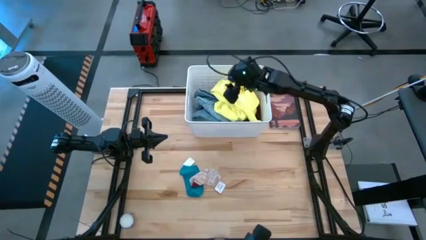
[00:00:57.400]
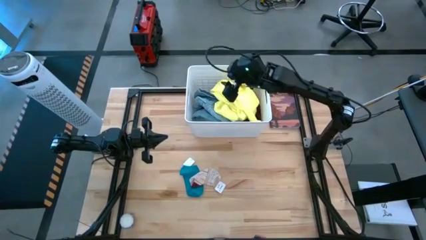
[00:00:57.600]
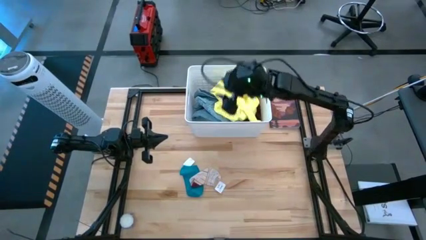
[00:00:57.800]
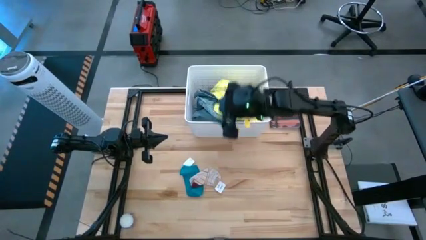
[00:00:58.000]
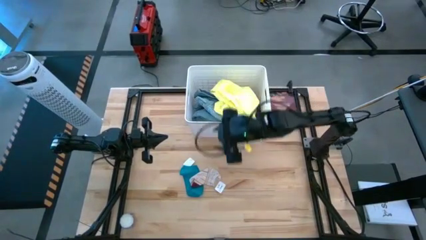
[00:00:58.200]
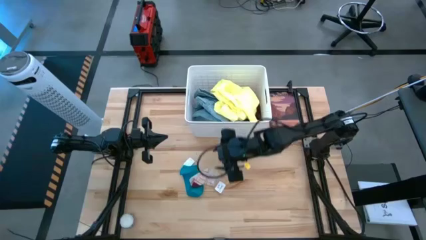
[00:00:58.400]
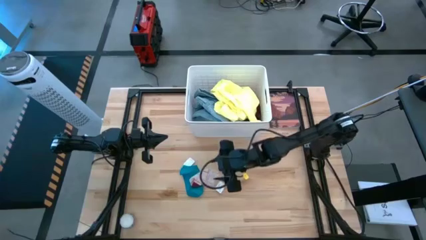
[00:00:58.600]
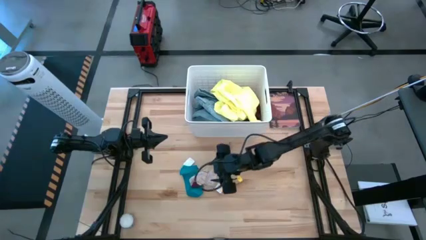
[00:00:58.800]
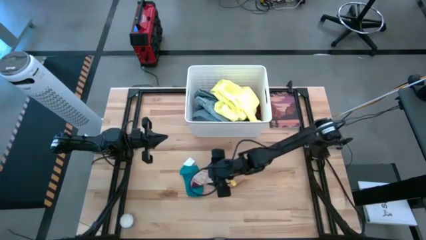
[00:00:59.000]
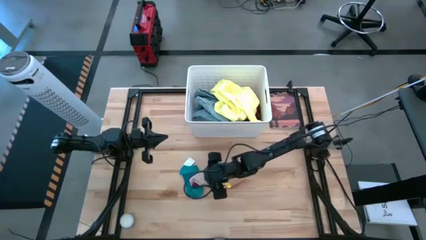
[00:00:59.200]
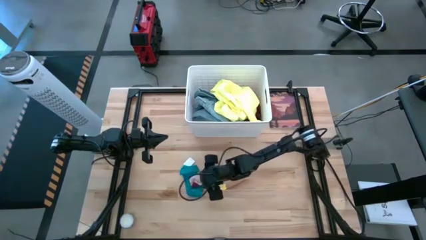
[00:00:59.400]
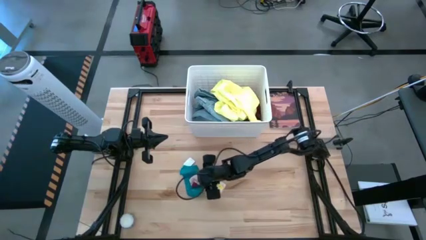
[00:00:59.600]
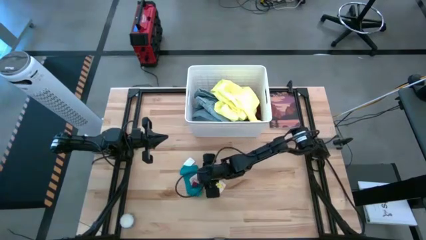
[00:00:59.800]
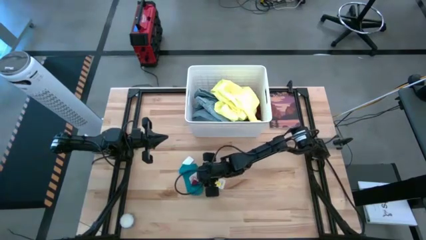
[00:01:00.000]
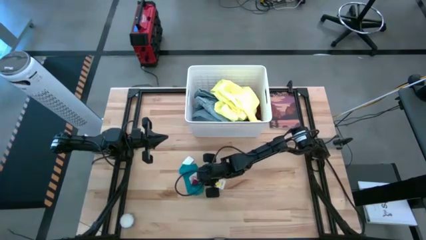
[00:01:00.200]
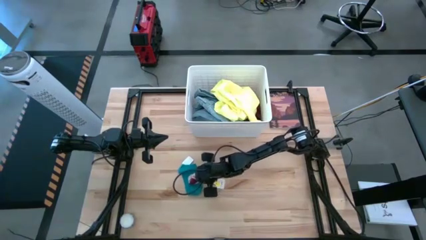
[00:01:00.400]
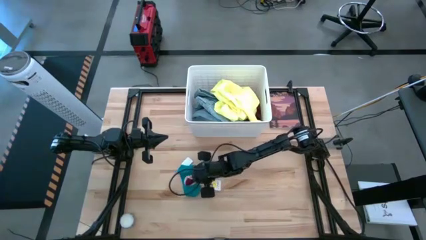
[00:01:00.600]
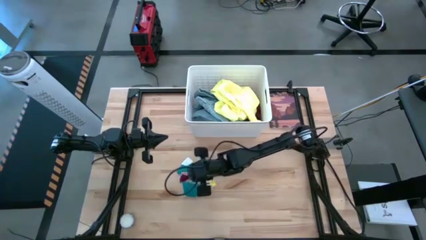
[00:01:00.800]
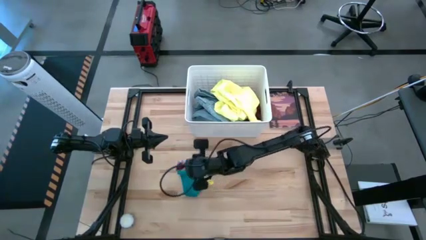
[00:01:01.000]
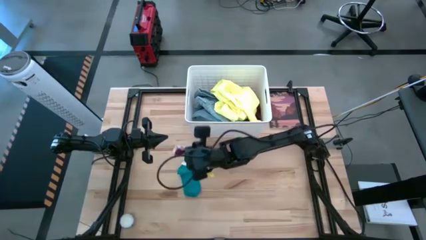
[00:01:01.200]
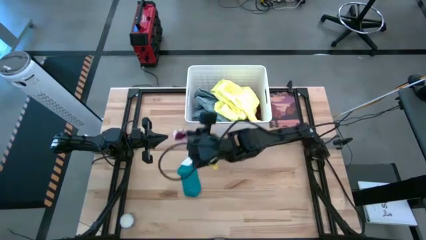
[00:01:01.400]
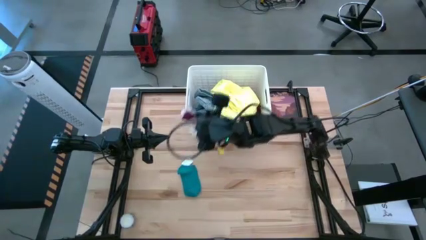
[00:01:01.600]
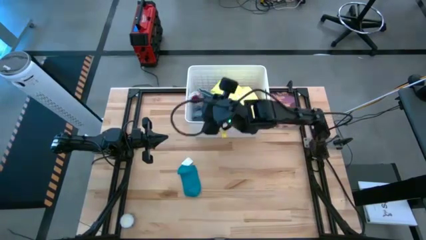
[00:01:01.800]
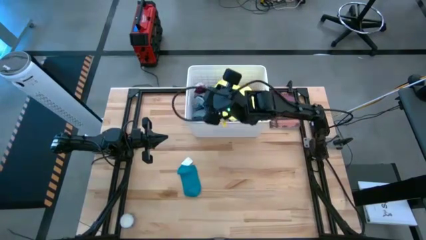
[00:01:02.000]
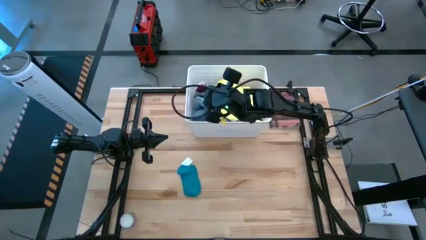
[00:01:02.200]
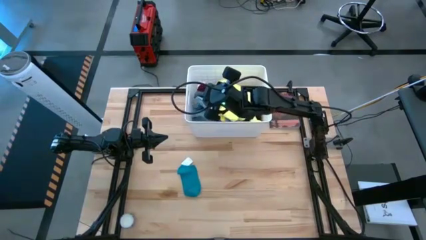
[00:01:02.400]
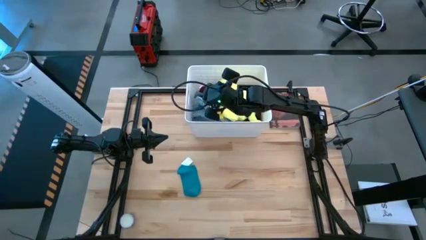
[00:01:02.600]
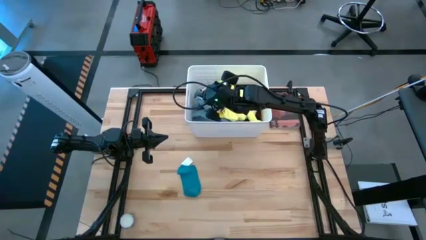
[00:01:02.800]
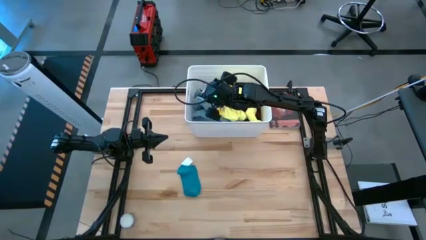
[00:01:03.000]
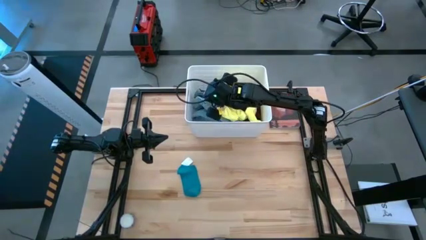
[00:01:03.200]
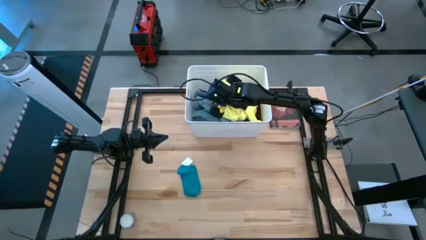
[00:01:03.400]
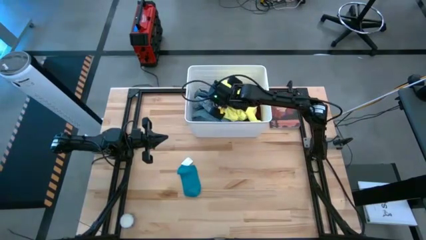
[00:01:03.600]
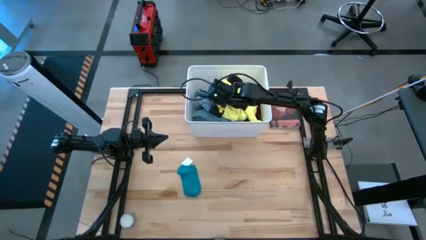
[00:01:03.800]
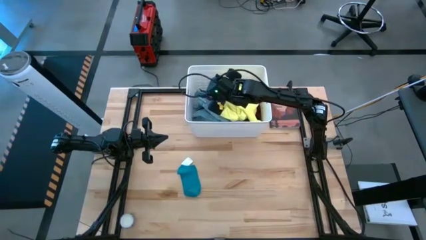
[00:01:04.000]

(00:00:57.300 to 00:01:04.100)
Task: Sort clothes
Put the gray sock into the white laundry bin

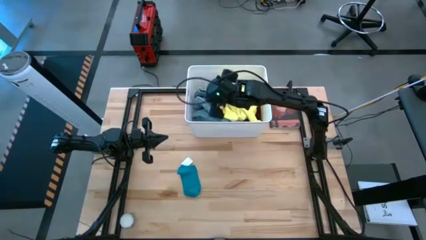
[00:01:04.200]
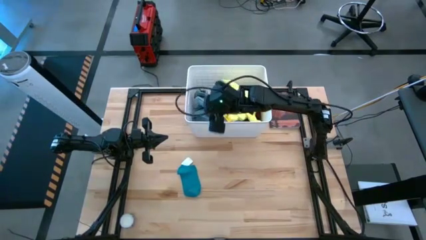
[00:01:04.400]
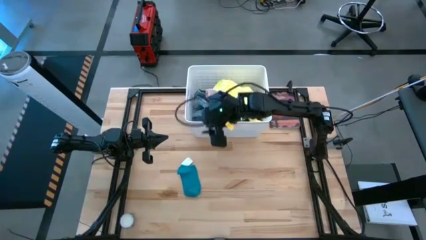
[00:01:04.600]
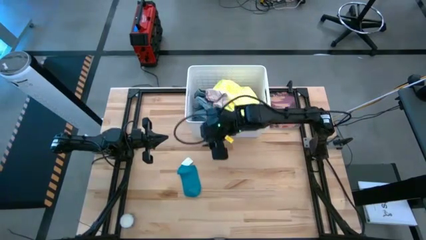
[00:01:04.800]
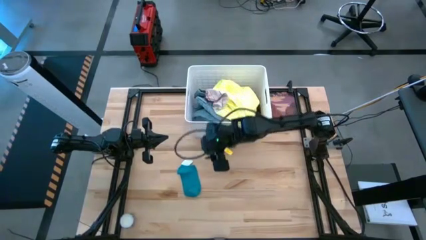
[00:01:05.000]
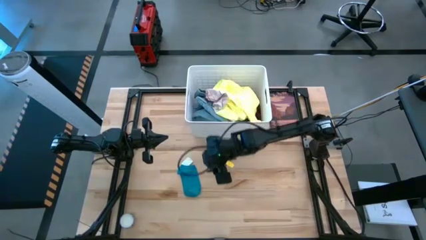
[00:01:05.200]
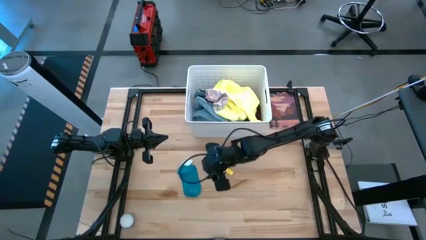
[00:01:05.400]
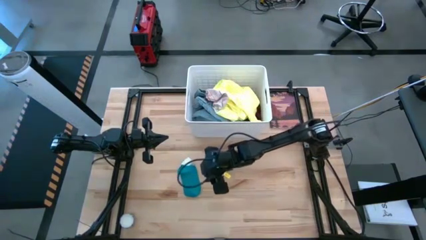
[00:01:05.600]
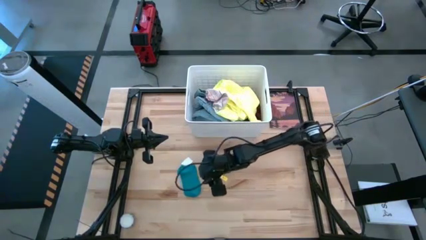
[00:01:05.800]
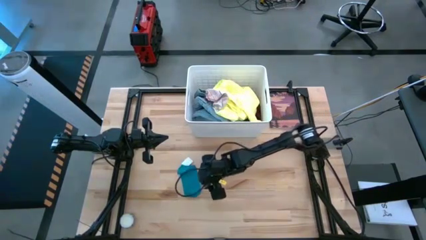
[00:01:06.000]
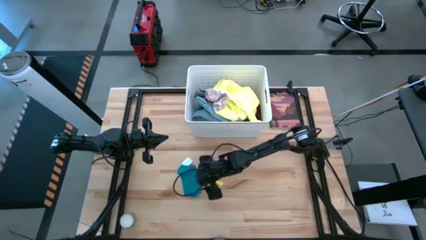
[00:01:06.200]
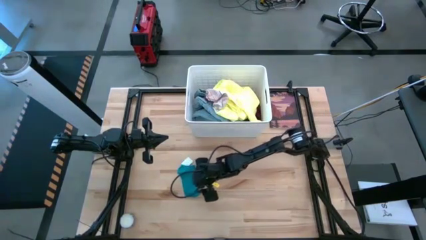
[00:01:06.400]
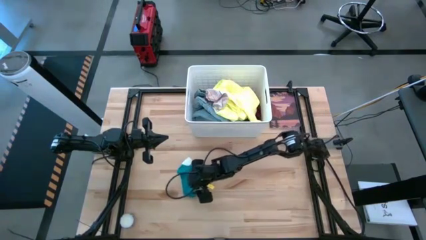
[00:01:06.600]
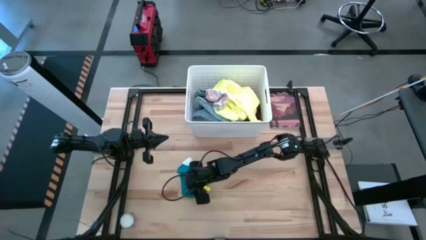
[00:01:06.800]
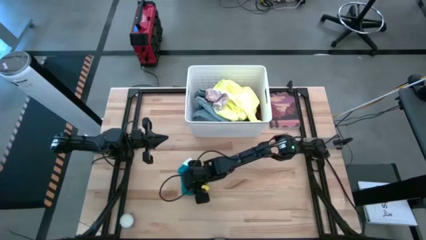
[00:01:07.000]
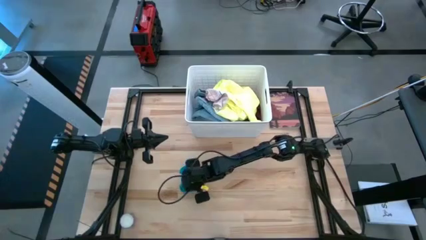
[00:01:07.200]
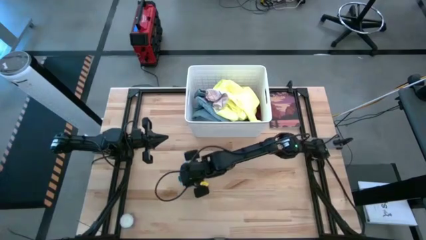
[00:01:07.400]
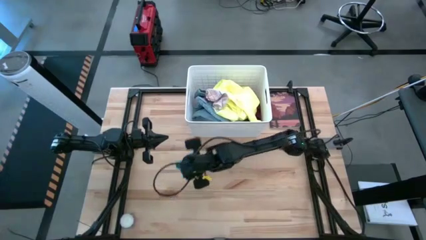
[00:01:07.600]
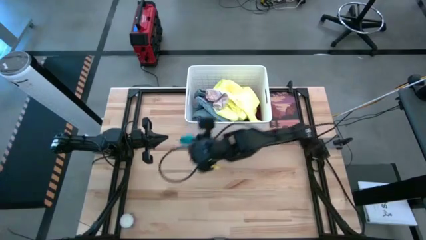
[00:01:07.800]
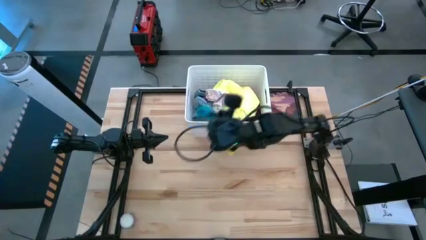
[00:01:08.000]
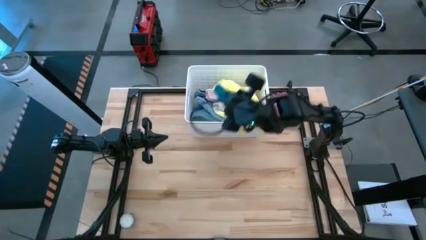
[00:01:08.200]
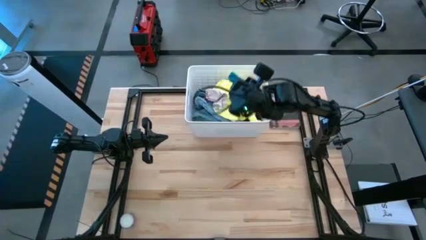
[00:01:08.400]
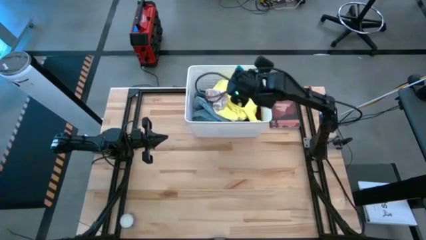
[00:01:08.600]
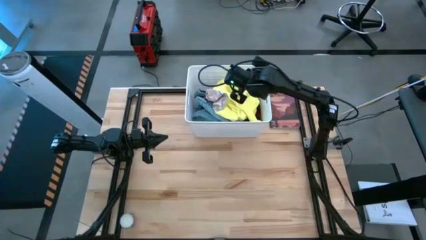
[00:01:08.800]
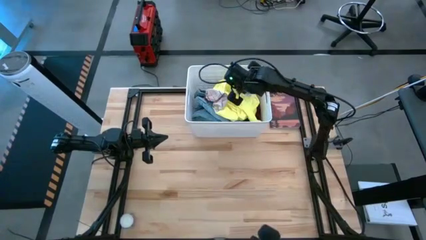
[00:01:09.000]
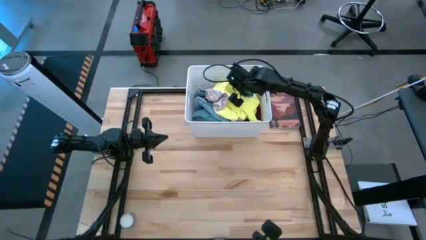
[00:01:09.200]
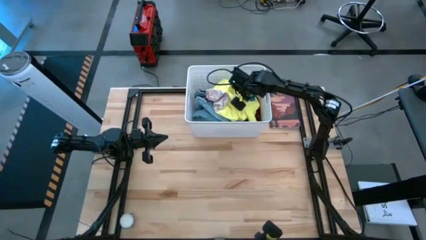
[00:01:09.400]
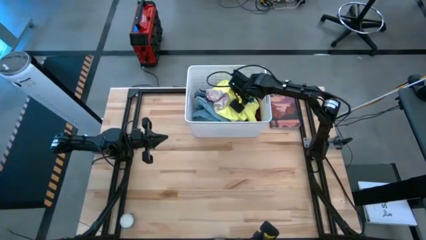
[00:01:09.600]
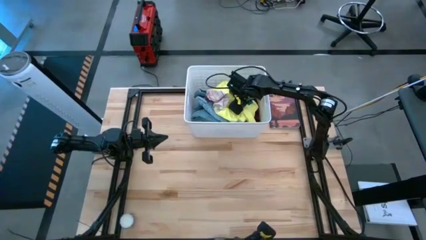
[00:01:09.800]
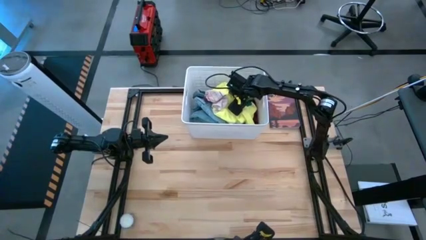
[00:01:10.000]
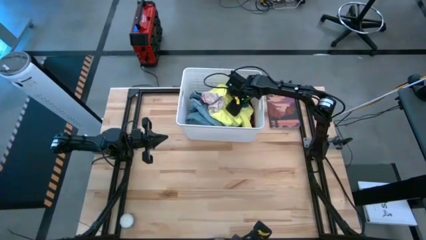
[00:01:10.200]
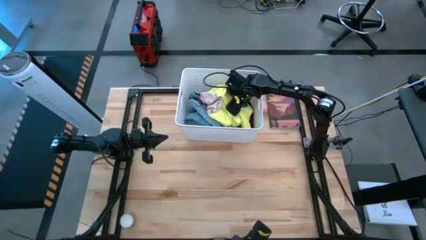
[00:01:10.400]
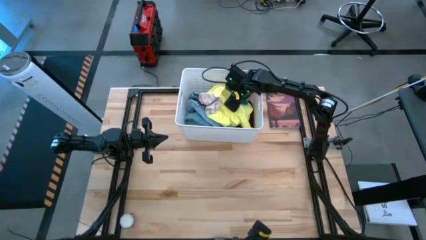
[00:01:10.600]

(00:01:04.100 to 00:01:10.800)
Put the blue sock into the white laundry bin

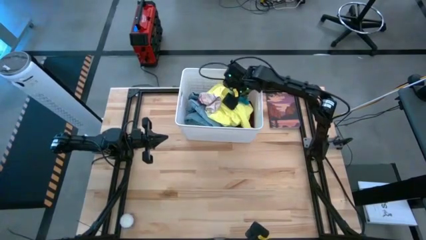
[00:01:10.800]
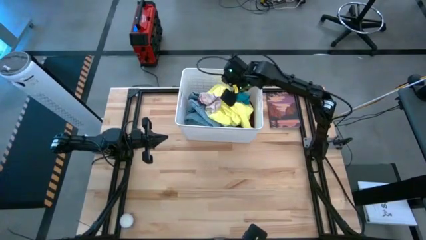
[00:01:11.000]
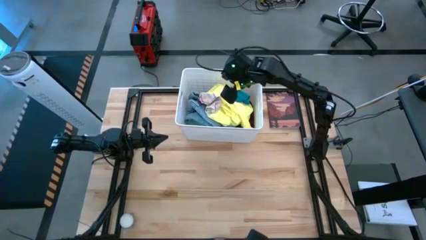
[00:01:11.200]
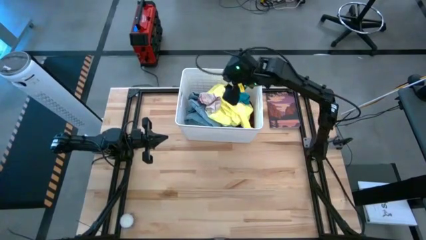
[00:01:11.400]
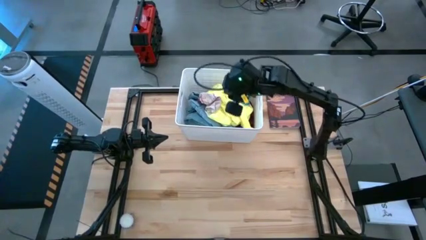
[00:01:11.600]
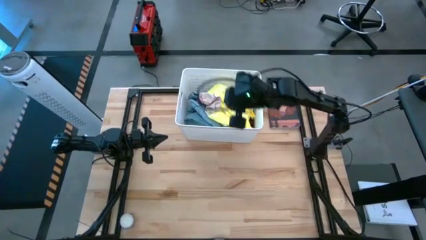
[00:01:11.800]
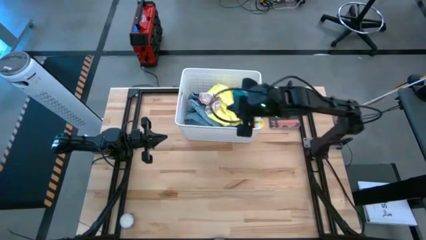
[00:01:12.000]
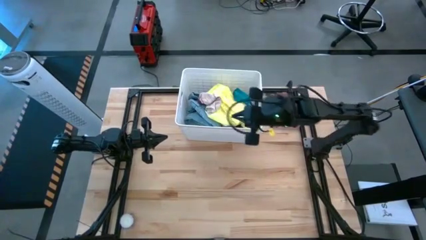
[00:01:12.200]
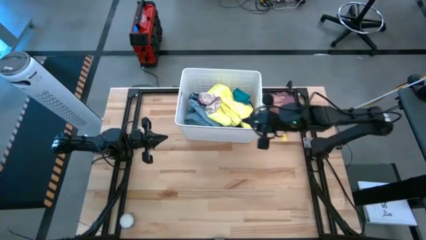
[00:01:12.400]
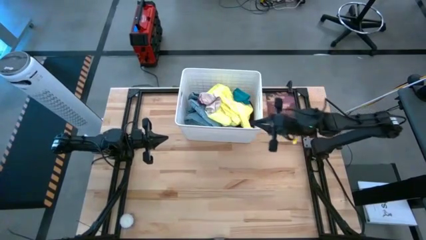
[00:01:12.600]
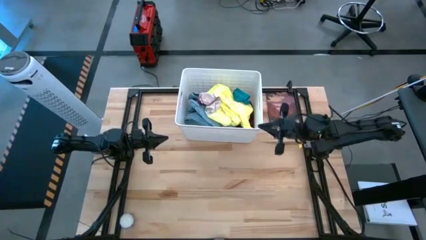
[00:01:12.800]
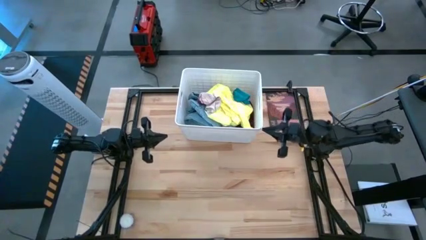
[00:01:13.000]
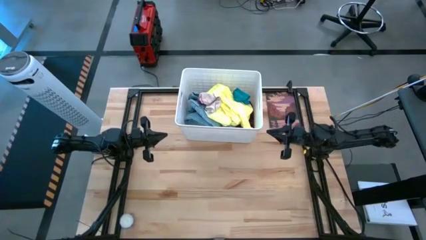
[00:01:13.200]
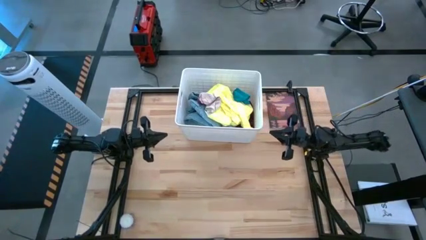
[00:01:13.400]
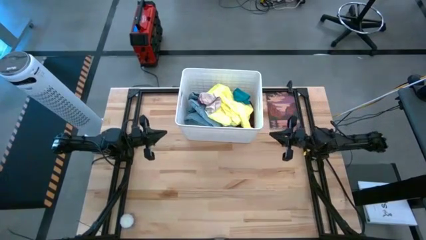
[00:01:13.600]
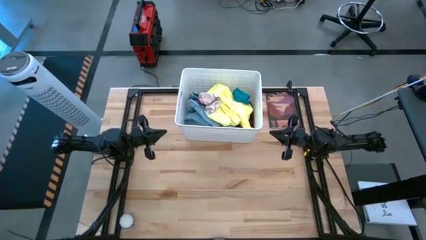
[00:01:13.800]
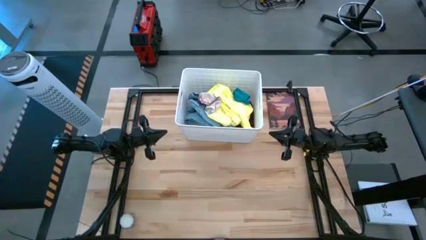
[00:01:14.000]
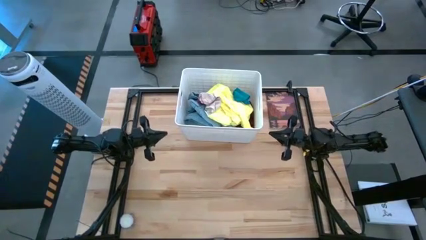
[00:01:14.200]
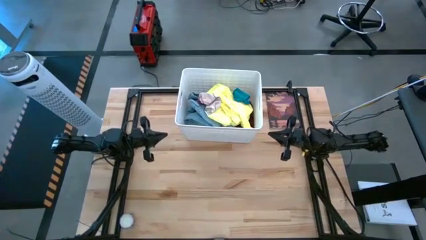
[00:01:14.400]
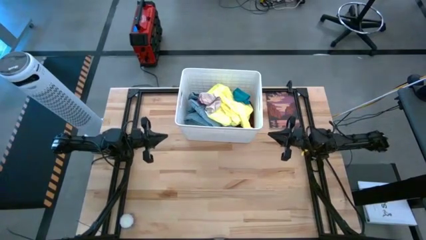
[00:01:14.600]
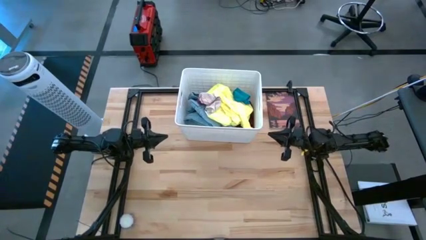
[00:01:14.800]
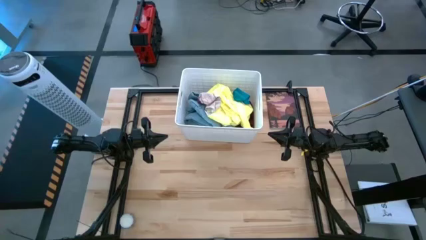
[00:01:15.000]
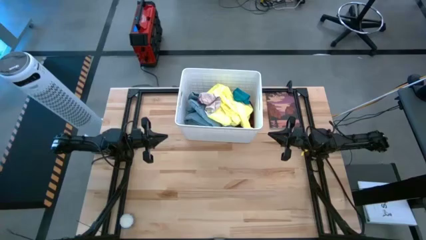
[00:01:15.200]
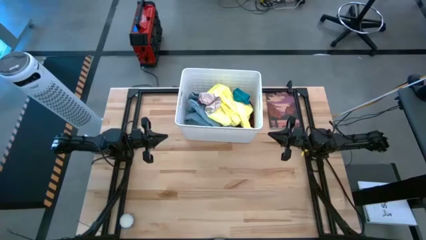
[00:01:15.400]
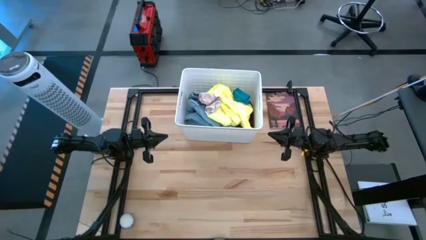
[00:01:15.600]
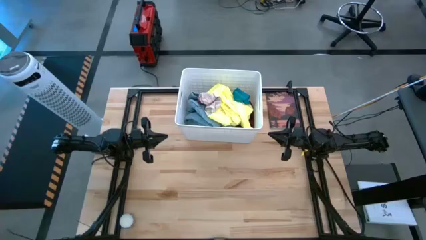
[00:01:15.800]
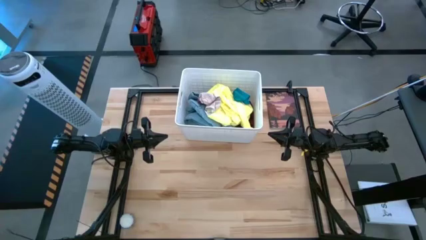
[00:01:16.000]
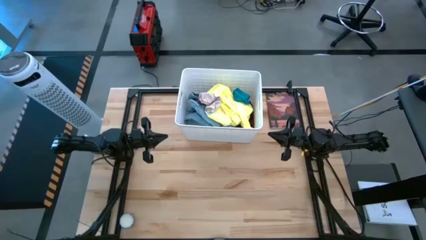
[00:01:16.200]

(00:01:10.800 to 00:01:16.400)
Return to Home Position
